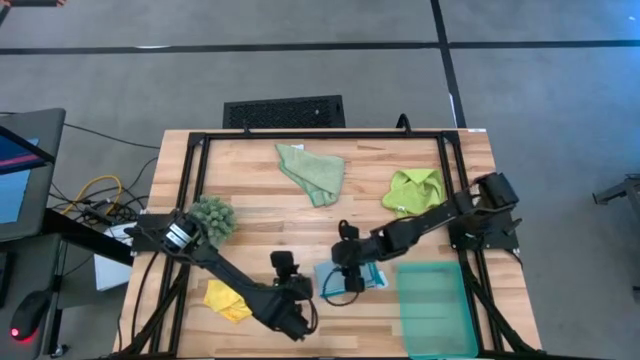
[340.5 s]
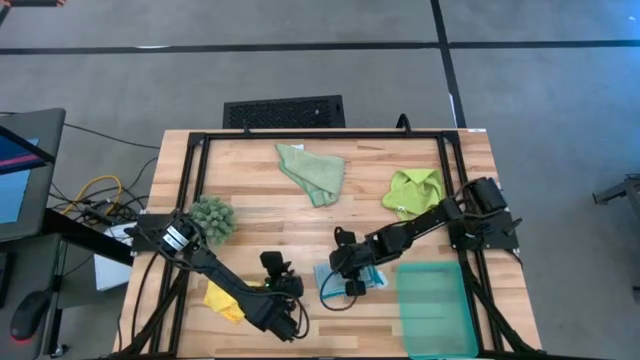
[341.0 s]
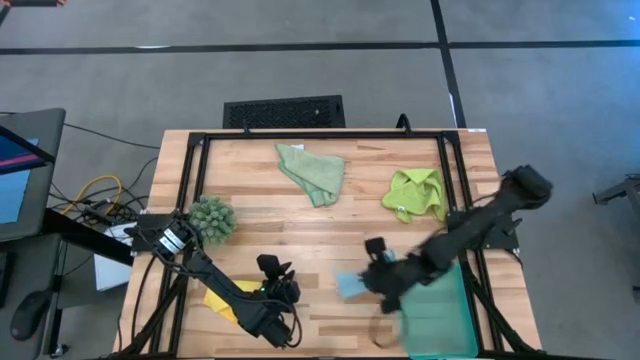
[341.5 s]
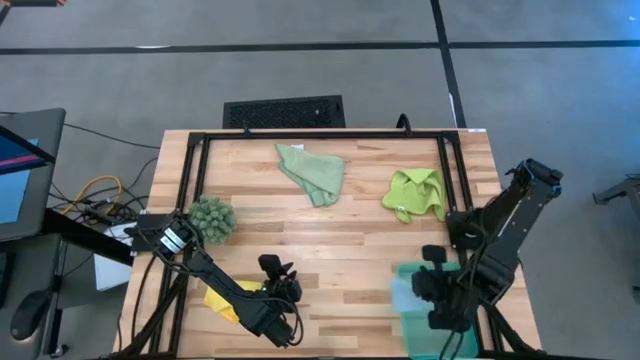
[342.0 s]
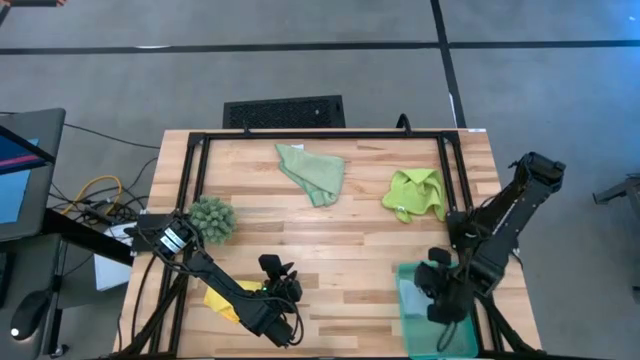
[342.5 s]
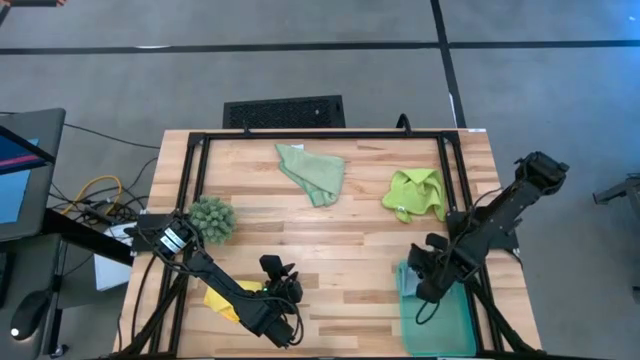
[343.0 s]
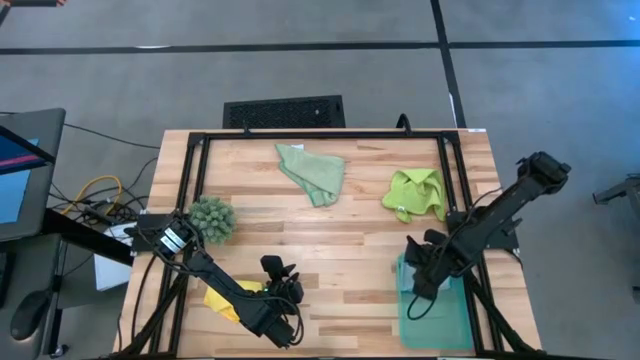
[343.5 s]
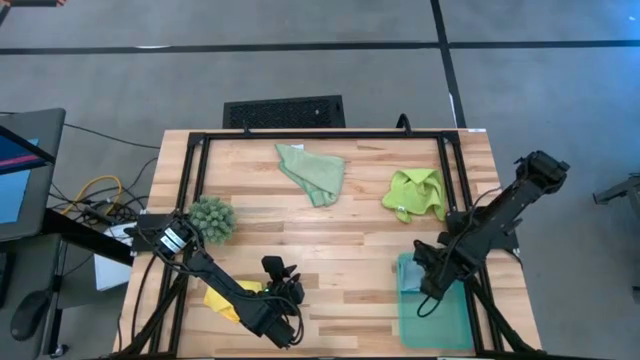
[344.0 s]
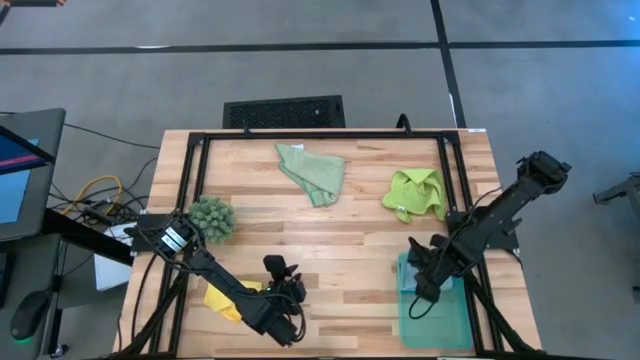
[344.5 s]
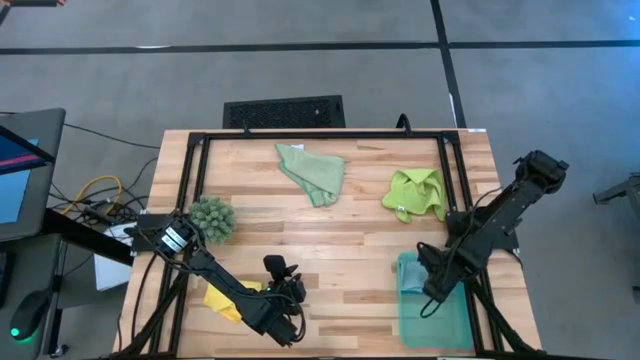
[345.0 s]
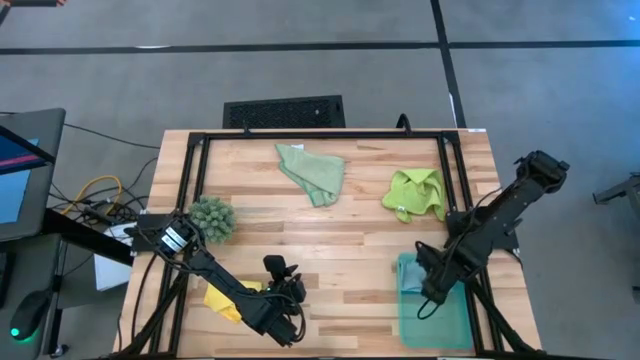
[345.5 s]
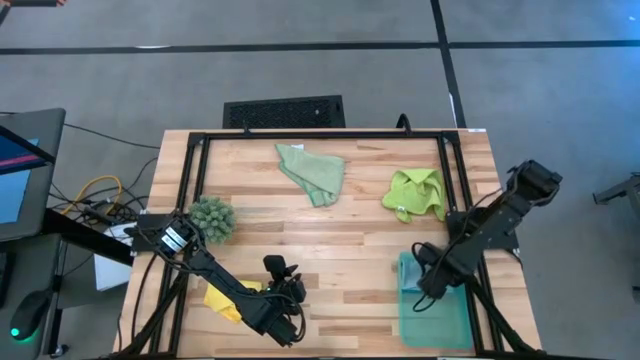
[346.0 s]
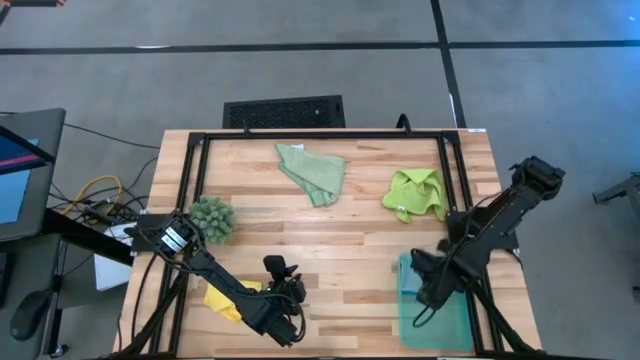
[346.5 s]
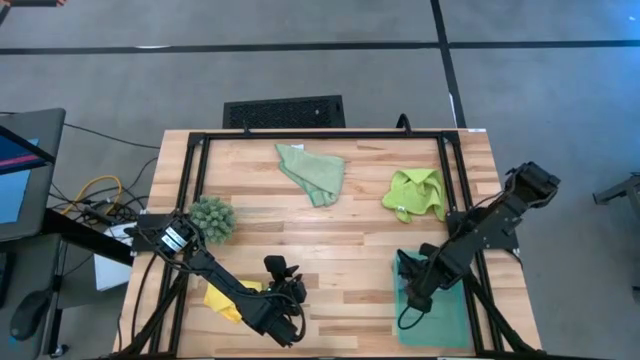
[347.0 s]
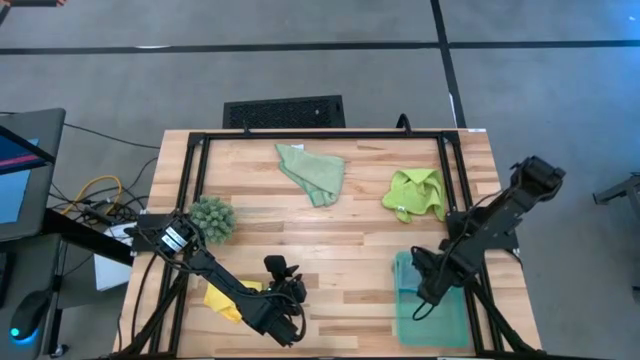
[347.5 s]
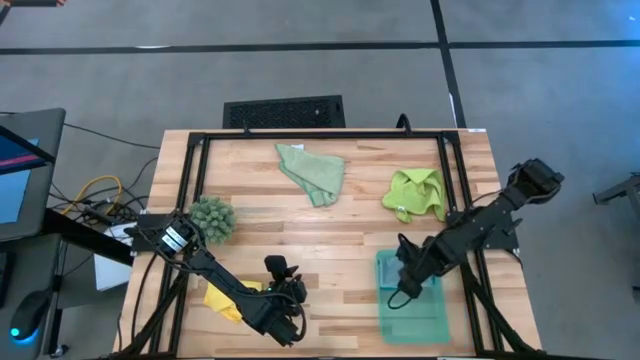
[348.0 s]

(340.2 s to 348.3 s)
Task: Fold microfiber towels
Put the folded blue microfiber cloth into the green bin

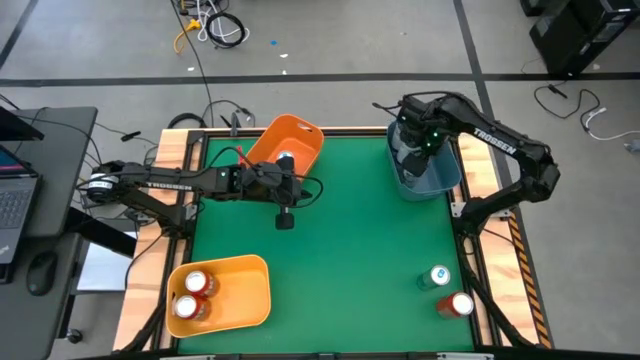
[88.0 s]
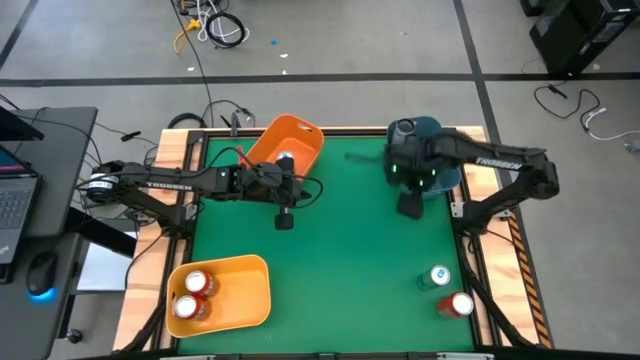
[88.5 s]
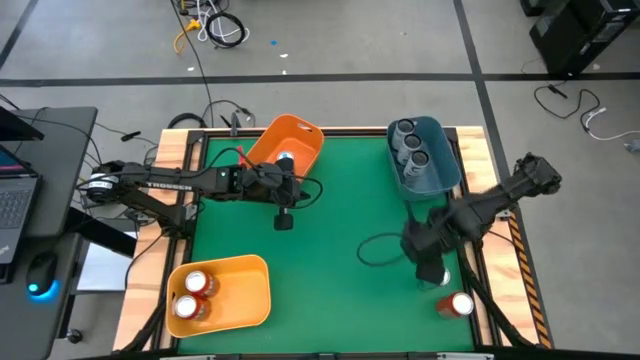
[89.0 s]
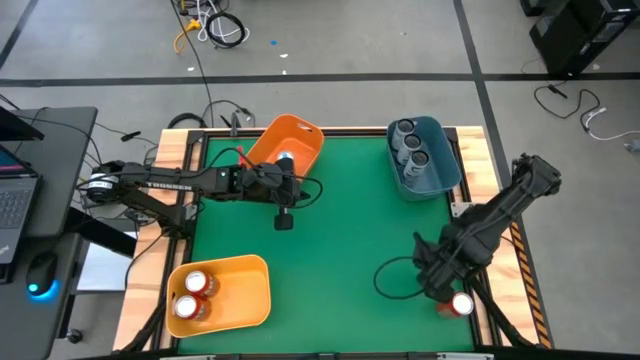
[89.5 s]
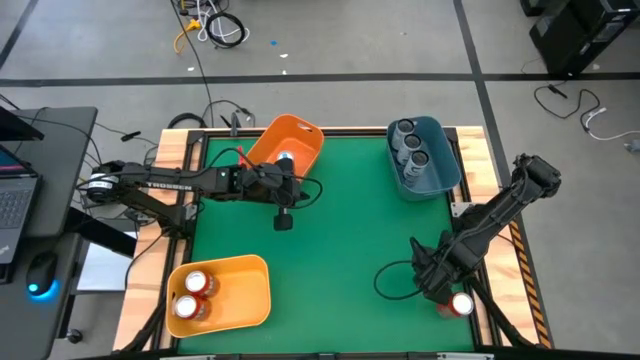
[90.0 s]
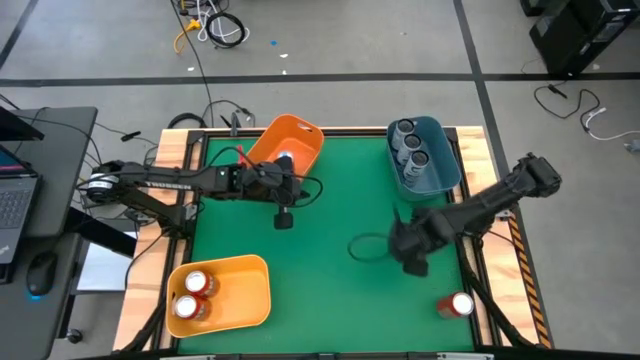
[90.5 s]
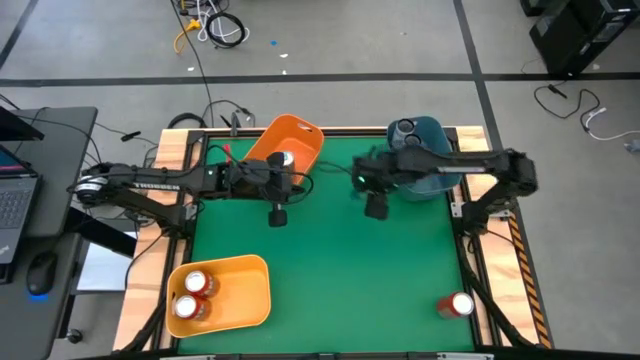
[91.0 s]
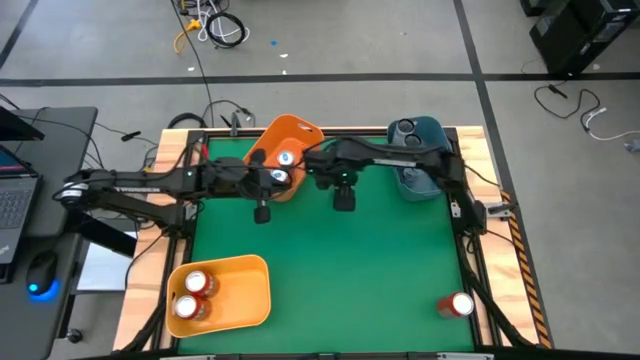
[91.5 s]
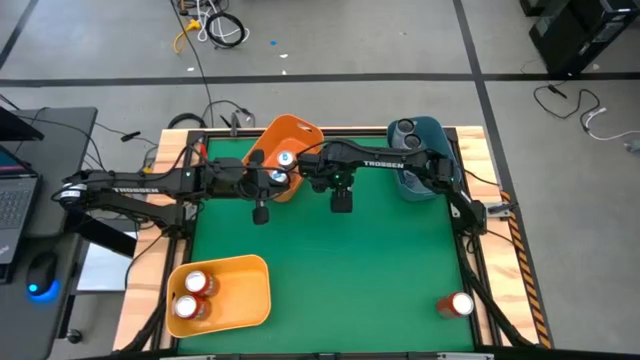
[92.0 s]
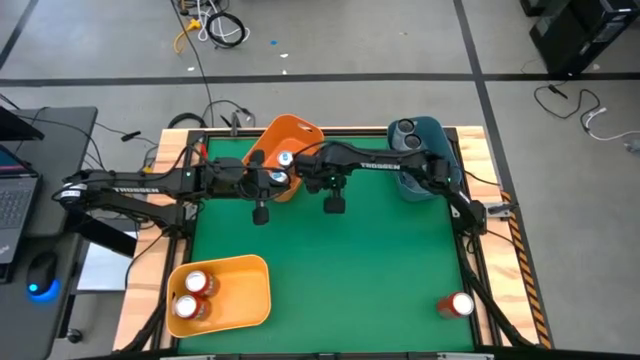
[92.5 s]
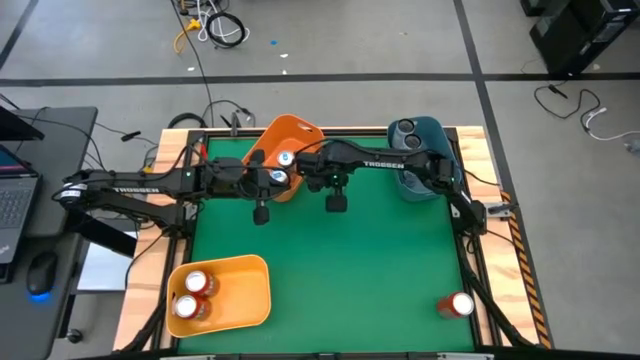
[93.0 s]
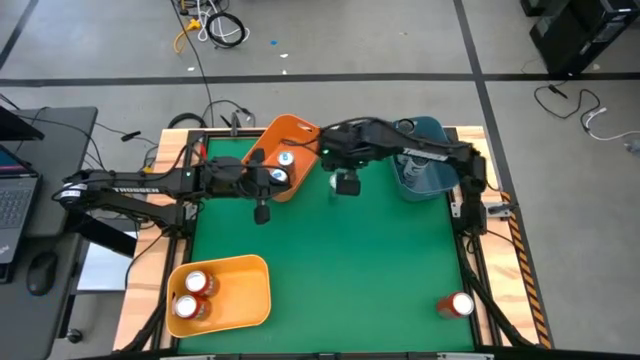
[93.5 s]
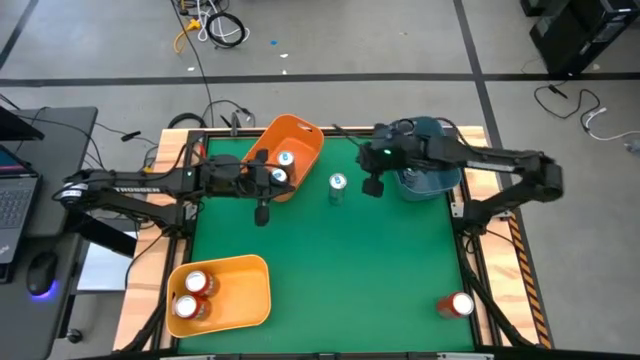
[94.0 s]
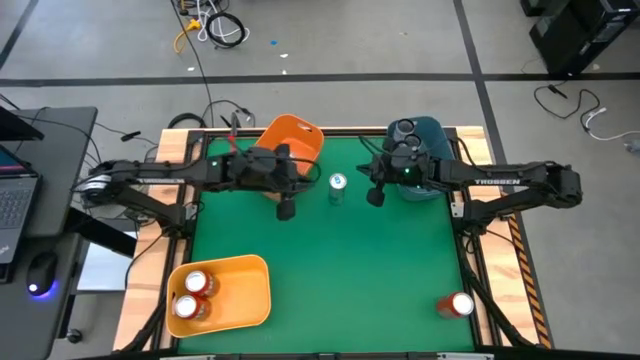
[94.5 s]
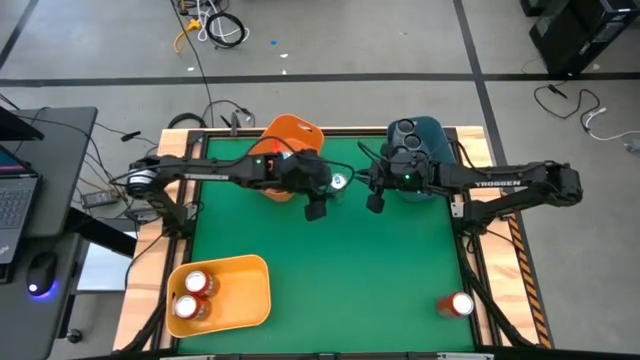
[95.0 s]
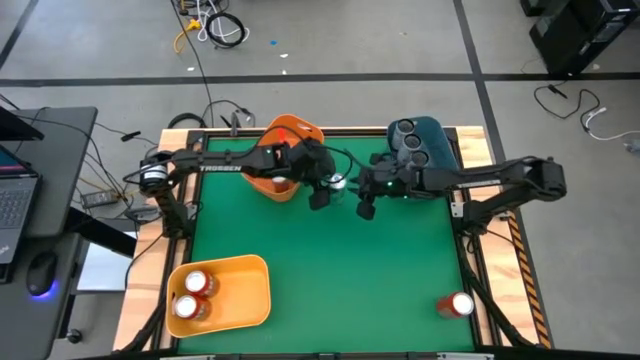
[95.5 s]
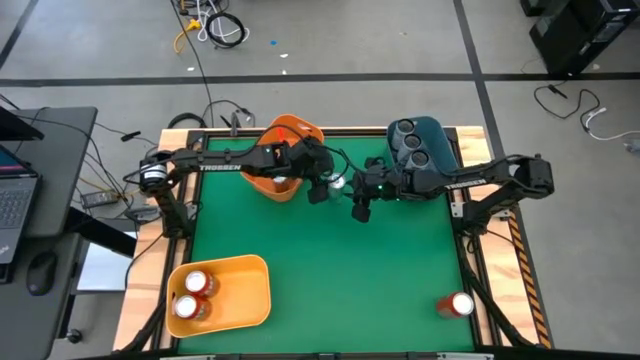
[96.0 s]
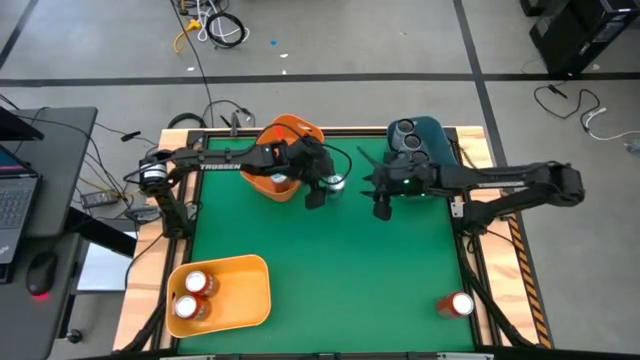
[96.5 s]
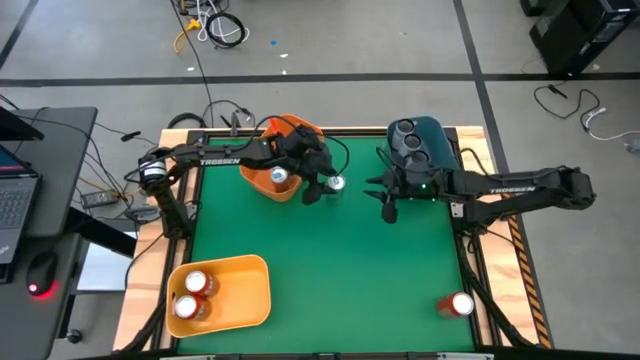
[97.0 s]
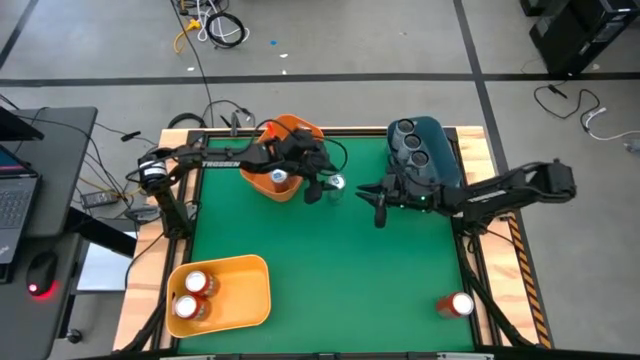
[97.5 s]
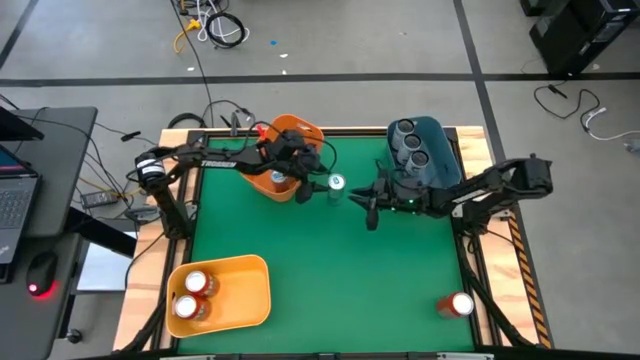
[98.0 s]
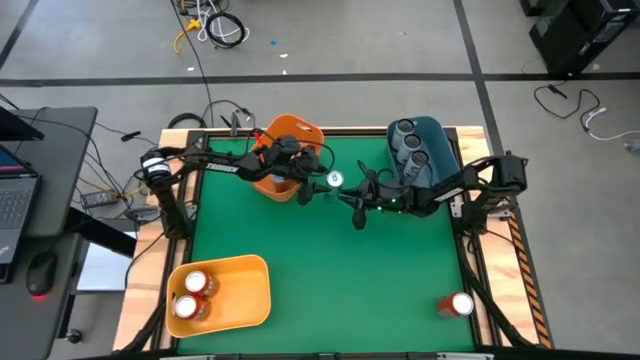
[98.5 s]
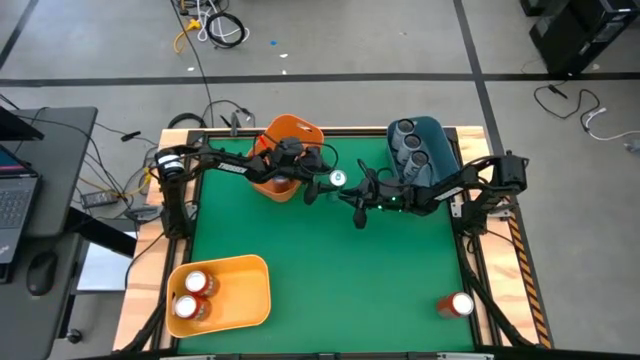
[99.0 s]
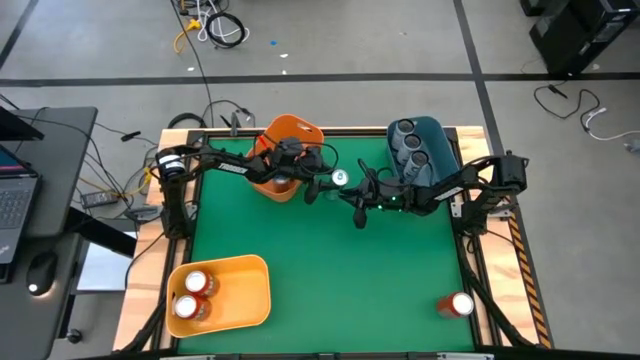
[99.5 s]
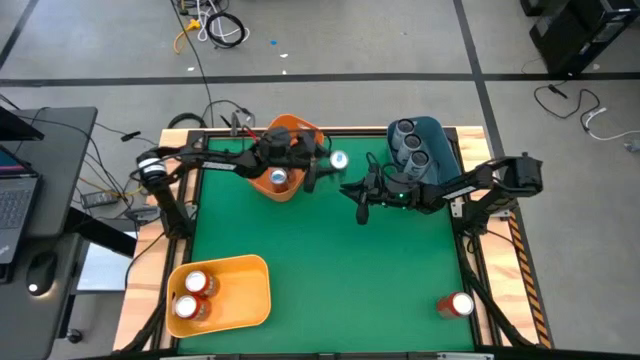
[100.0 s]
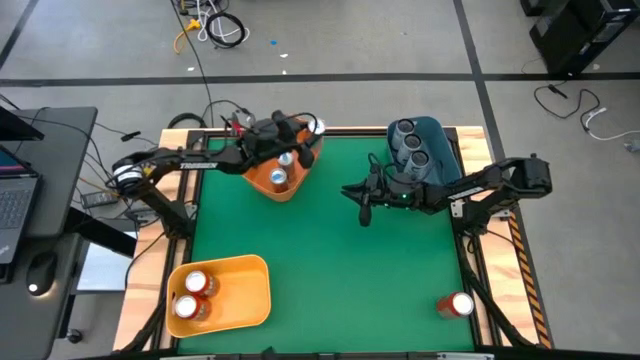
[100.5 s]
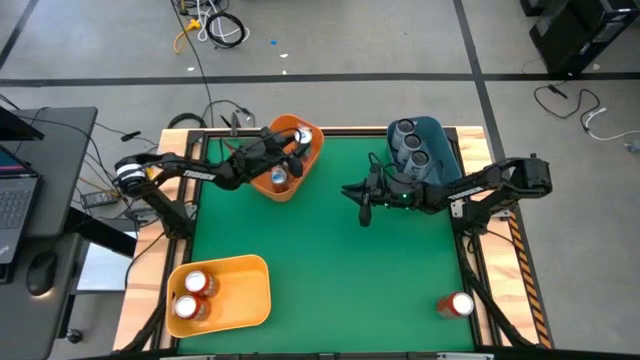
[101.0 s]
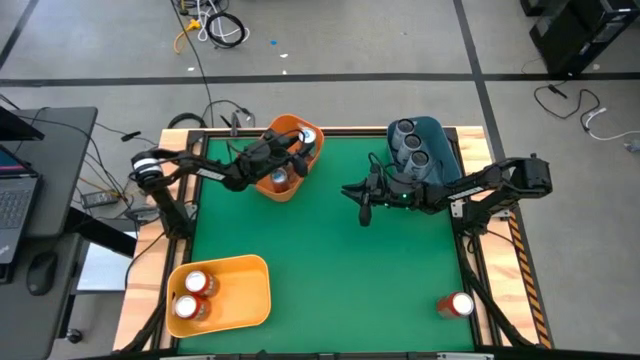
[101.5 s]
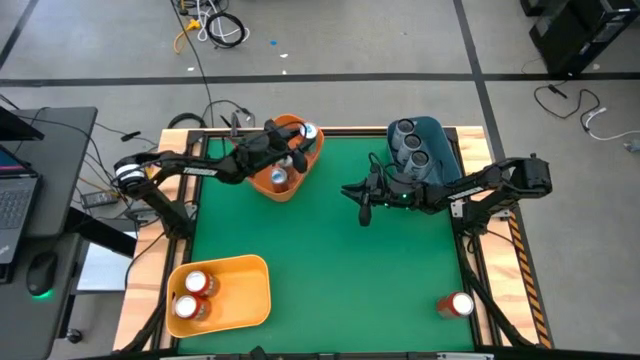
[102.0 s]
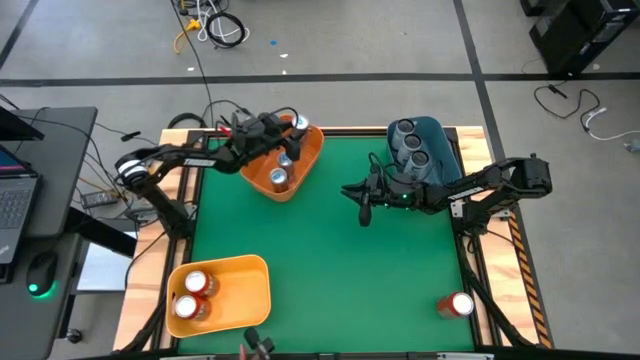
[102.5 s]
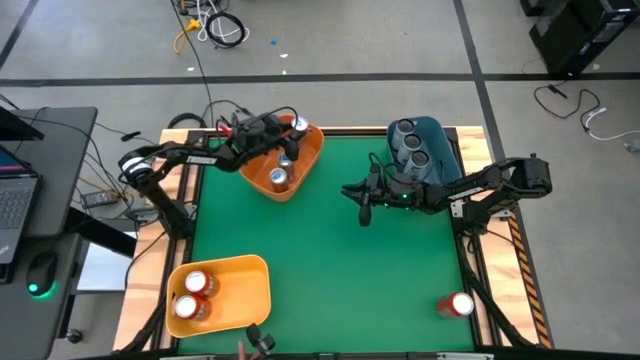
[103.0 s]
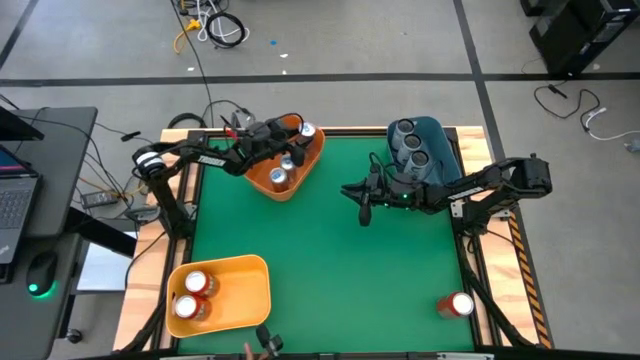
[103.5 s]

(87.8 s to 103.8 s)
Task: Sort soda cans
Put the blue soda can into the orange bin
